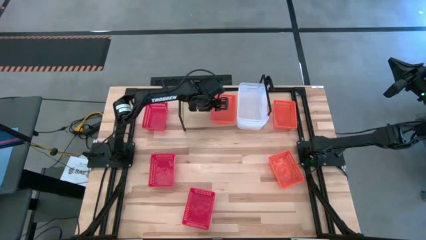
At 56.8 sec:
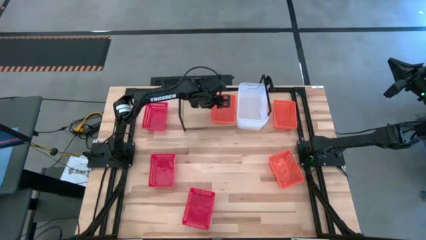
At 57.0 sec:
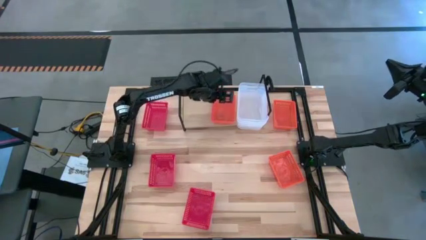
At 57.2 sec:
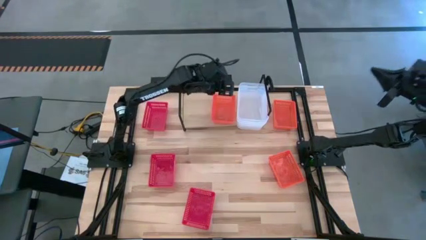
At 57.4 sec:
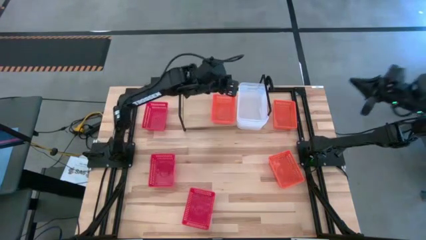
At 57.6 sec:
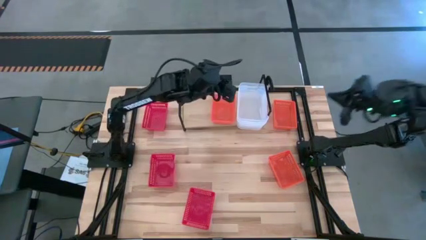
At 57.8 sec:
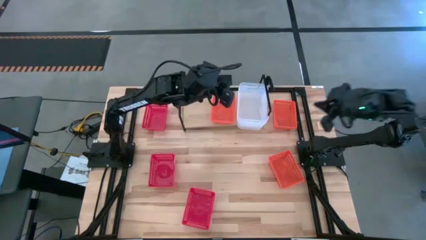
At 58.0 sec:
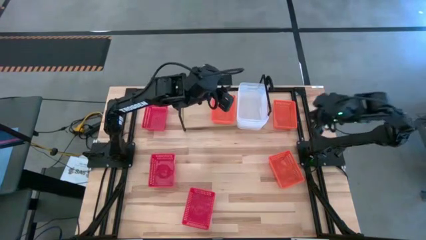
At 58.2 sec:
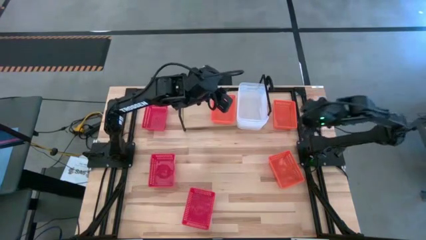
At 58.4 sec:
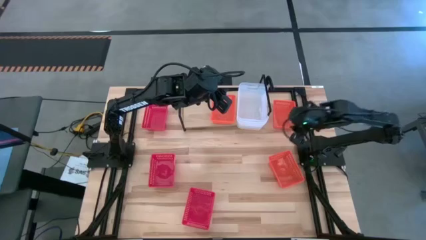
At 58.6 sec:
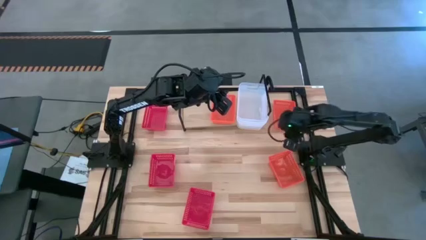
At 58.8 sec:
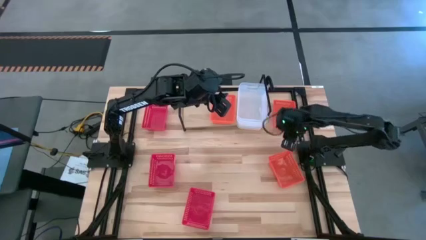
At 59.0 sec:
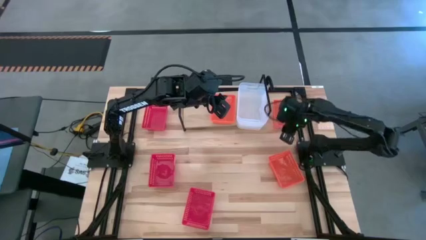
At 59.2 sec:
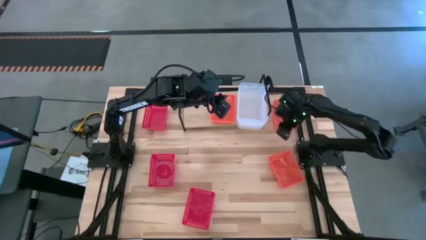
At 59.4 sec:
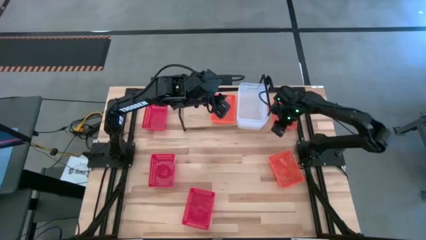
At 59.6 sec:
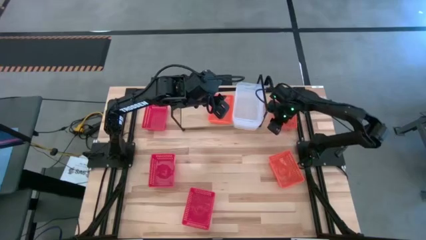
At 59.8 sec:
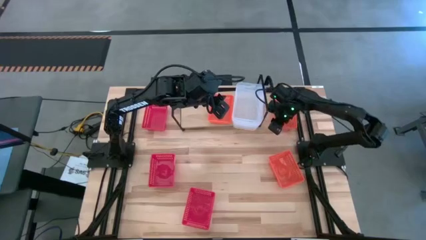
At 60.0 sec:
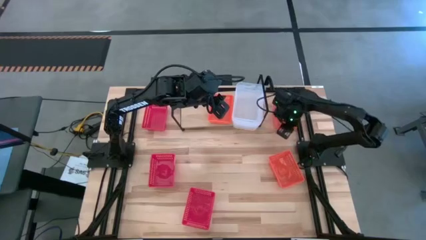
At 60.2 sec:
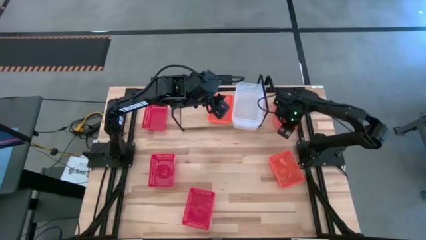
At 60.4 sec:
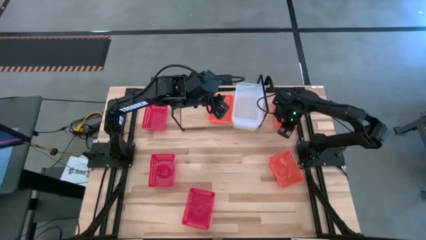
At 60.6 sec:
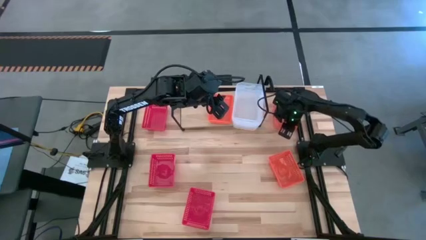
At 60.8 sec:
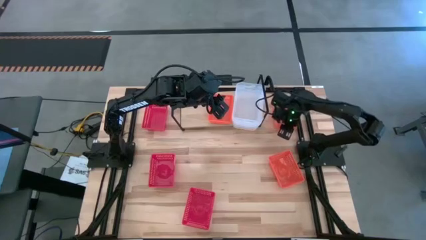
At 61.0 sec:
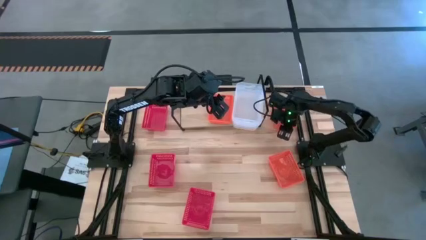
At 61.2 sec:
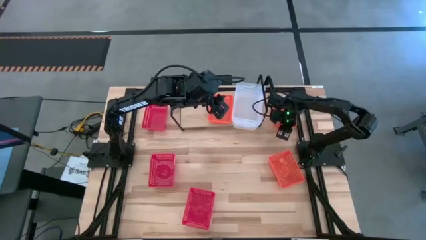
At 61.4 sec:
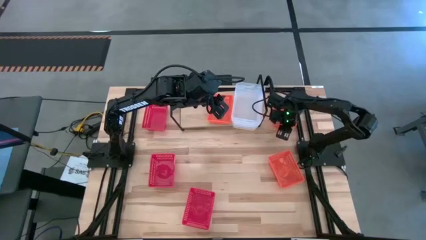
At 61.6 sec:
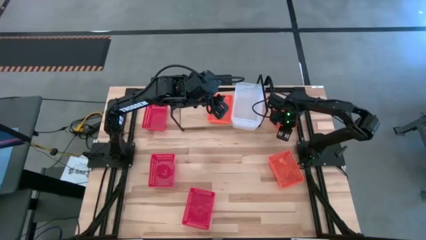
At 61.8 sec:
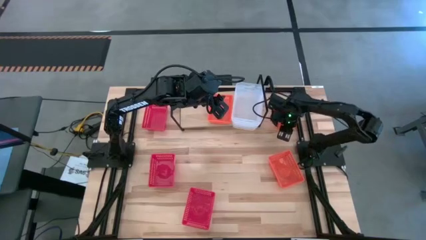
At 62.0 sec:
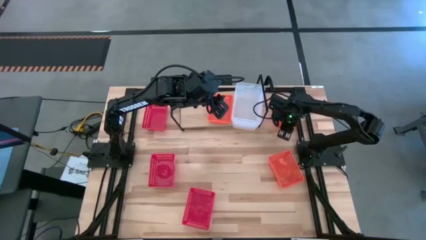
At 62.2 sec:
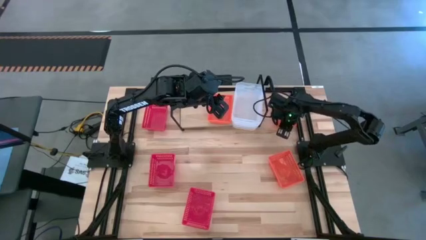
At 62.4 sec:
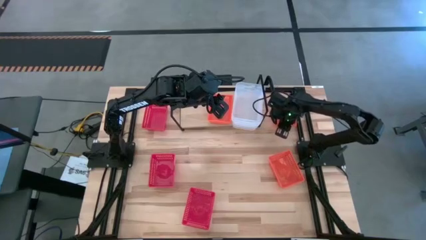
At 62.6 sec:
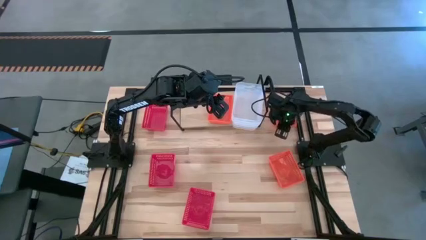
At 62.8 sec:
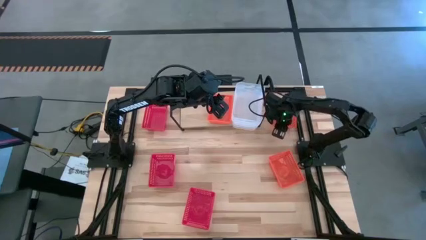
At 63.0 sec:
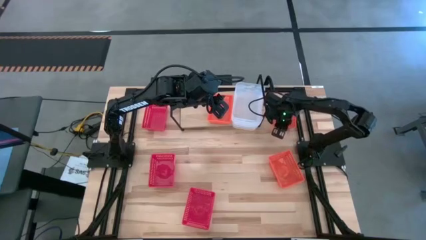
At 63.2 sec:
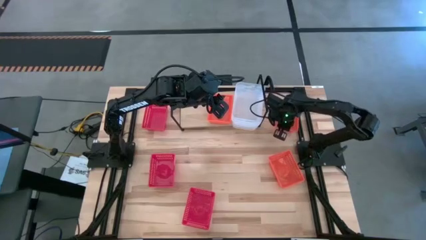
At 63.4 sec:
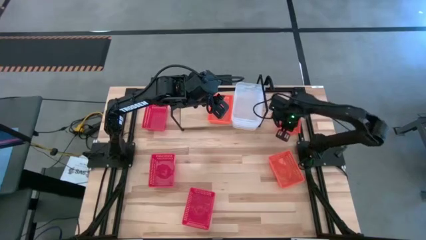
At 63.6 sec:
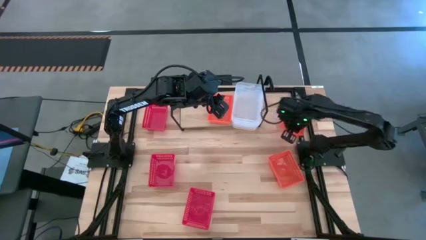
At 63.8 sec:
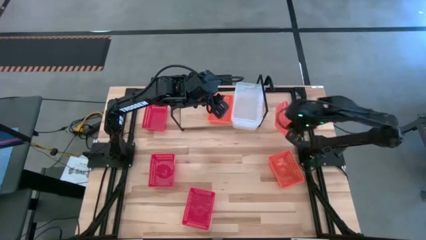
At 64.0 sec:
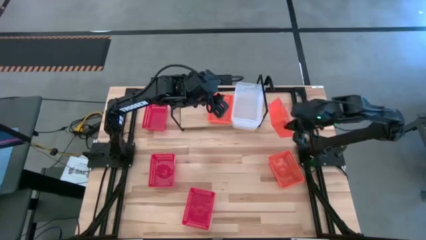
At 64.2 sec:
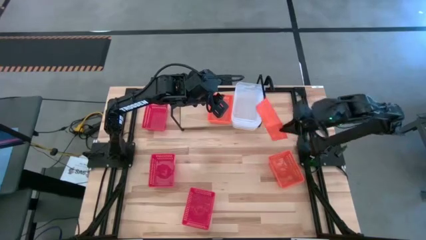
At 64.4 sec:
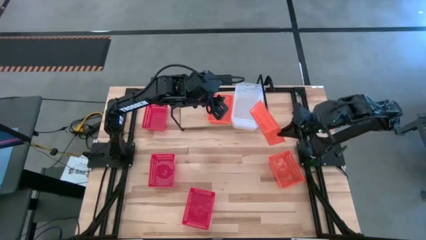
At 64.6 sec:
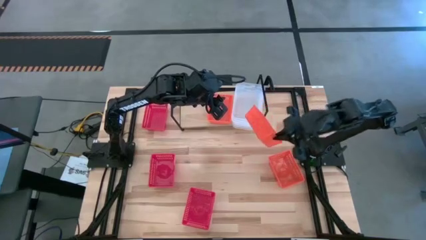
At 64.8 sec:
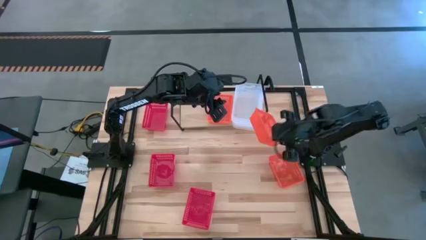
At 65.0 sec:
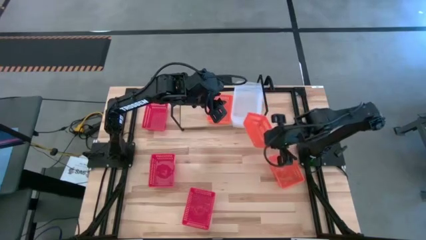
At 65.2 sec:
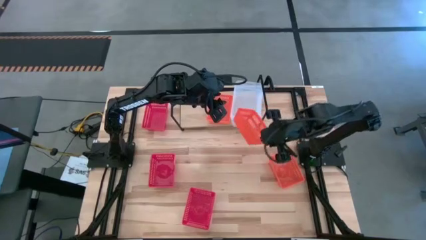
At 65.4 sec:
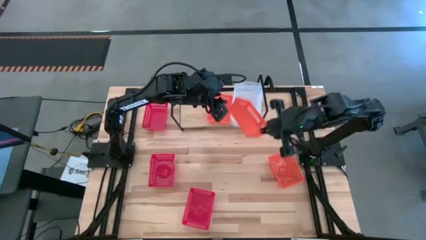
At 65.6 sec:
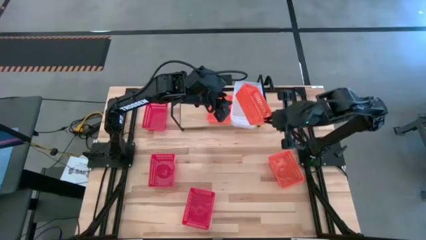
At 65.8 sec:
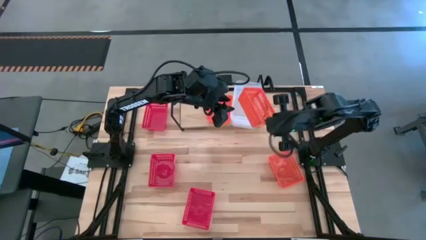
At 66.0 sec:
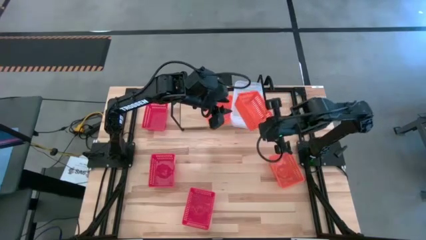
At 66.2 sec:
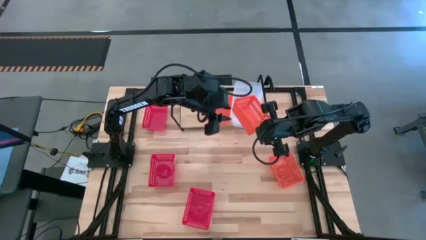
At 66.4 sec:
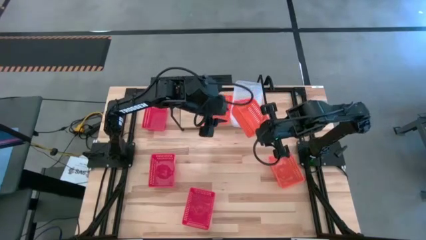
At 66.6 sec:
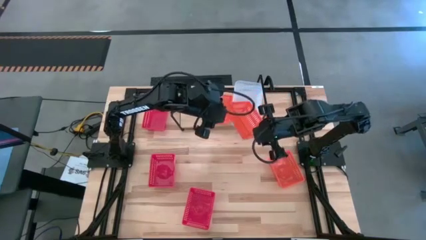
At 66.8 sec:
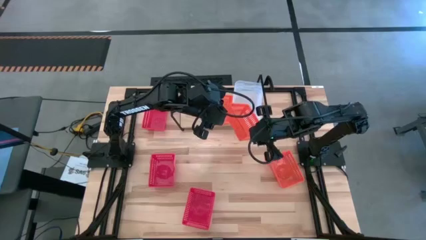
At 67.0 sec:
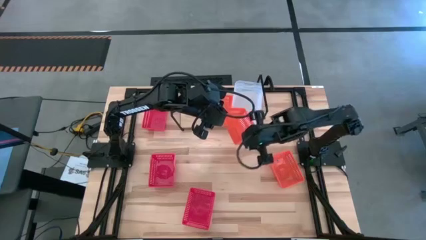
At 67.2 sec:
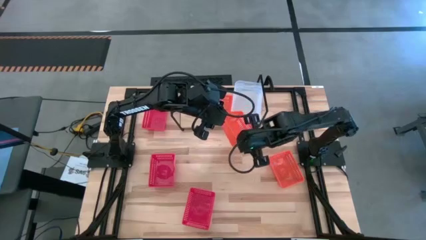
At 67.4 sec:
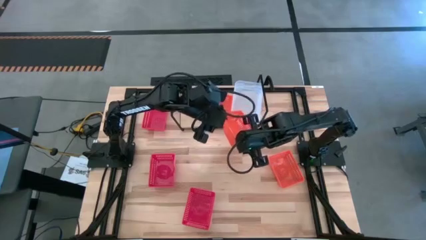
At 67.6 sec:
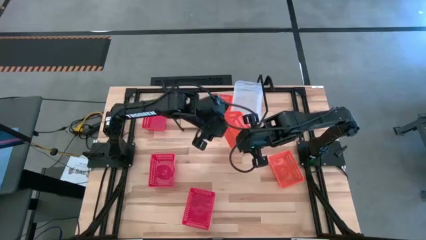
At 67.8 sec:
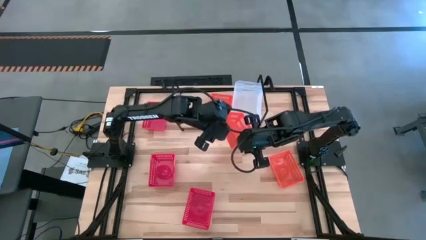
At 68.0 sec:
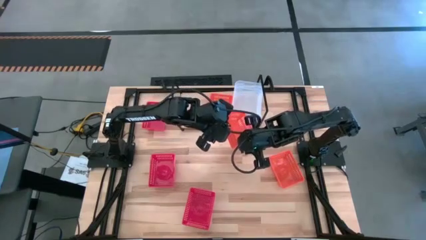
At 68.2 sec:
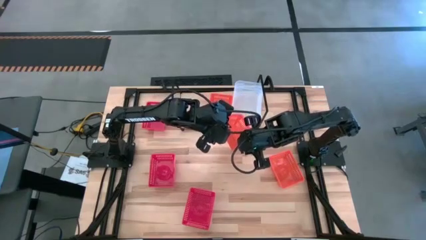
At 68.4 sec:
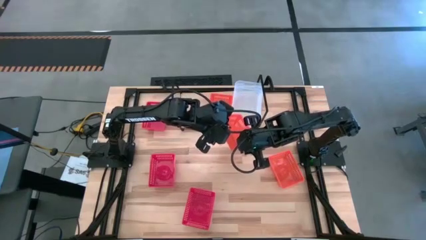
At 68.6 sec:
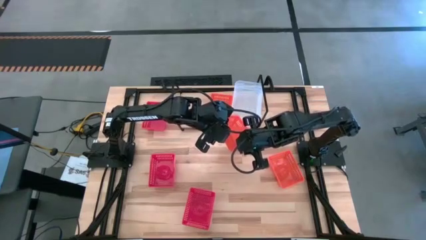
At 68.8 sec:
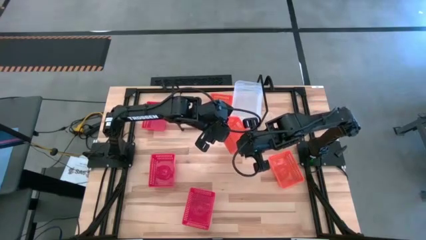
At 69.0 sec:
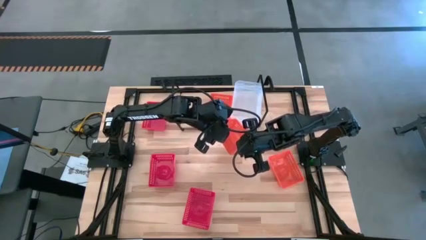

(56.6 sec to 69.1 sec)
Task: Stack baskets on shelf by color
Stack the top orange bin on top of the orange bin on the shelf

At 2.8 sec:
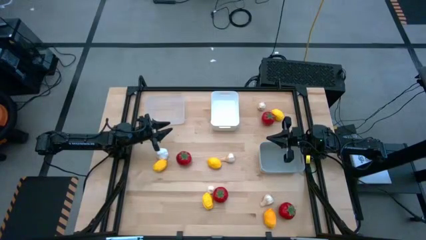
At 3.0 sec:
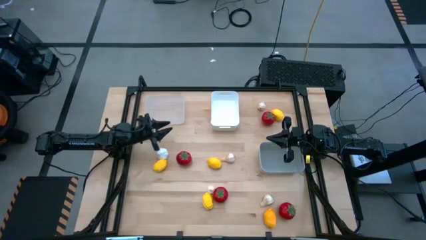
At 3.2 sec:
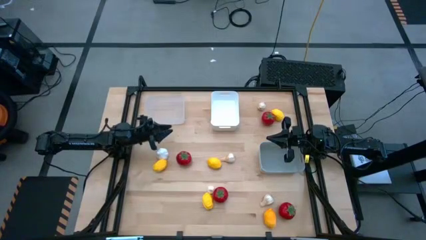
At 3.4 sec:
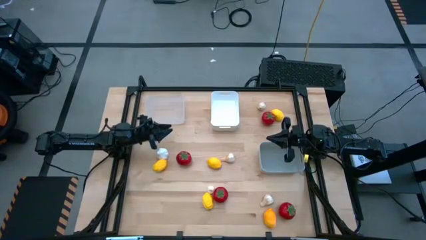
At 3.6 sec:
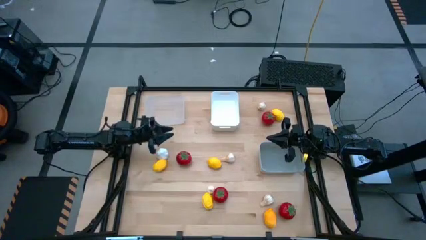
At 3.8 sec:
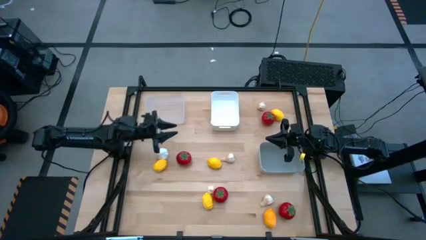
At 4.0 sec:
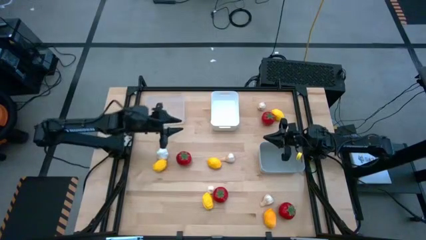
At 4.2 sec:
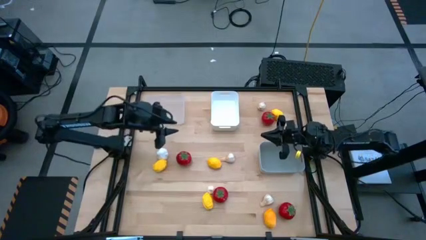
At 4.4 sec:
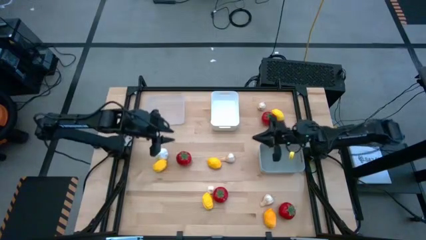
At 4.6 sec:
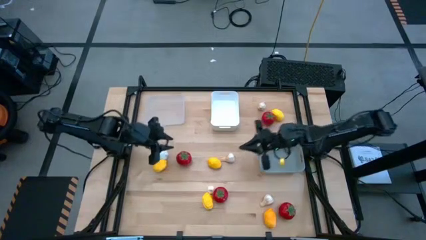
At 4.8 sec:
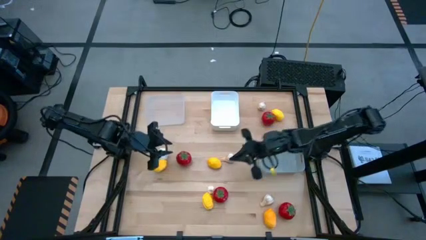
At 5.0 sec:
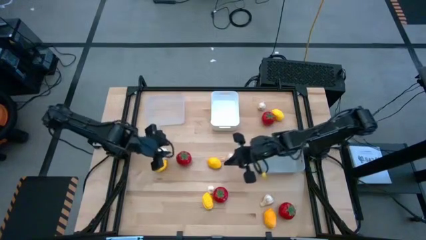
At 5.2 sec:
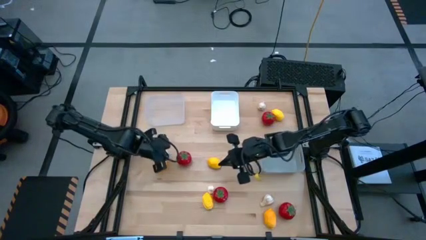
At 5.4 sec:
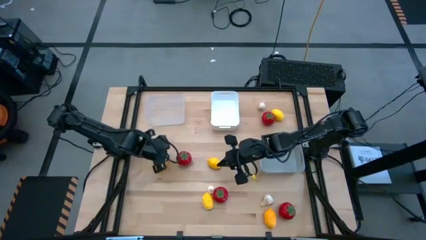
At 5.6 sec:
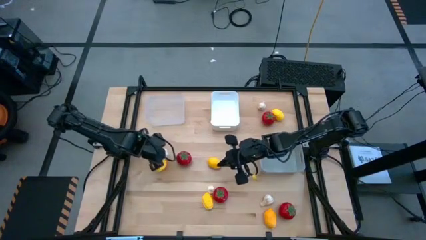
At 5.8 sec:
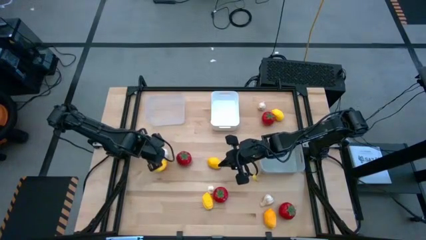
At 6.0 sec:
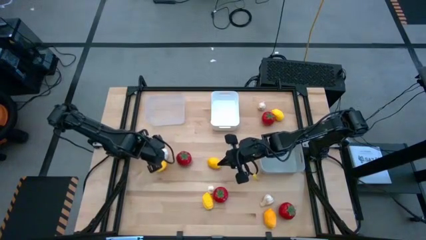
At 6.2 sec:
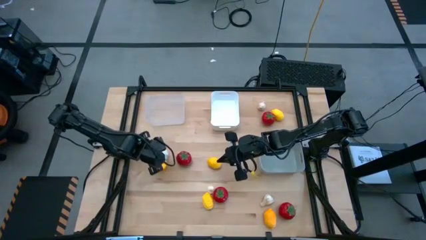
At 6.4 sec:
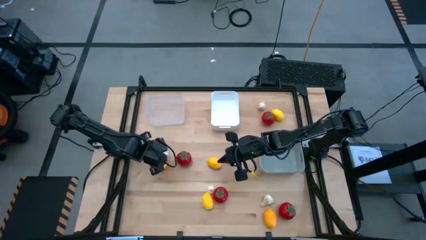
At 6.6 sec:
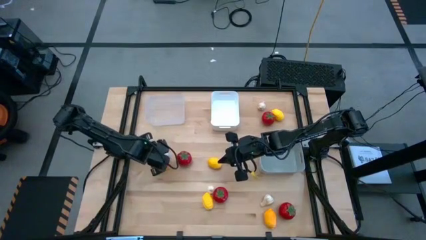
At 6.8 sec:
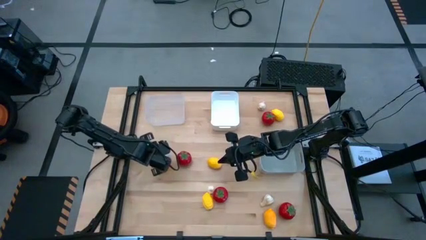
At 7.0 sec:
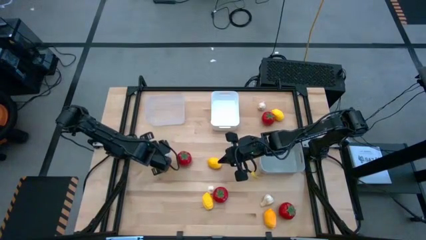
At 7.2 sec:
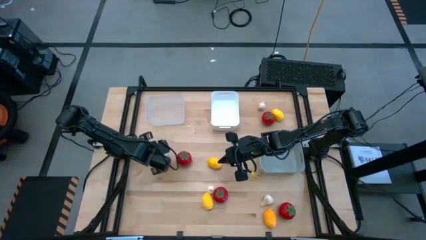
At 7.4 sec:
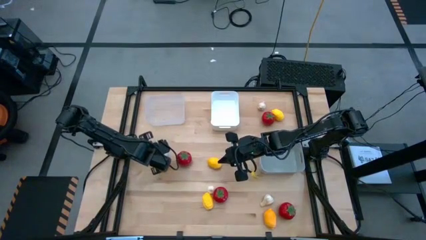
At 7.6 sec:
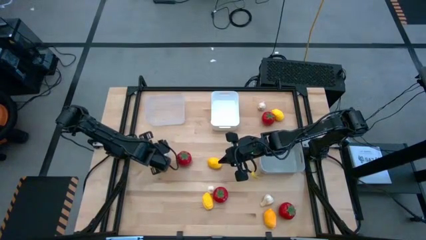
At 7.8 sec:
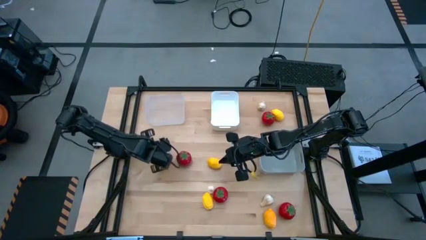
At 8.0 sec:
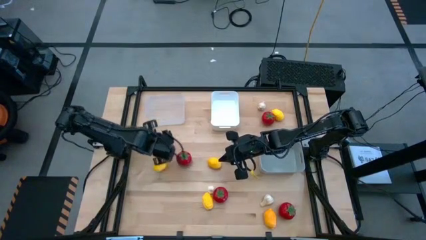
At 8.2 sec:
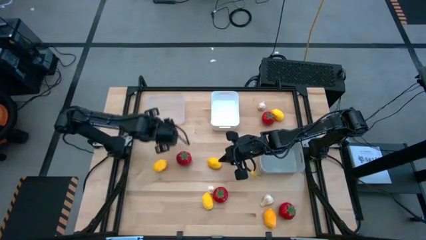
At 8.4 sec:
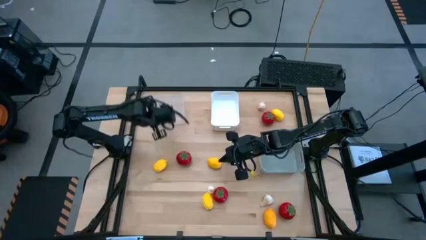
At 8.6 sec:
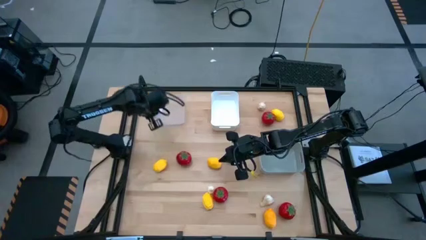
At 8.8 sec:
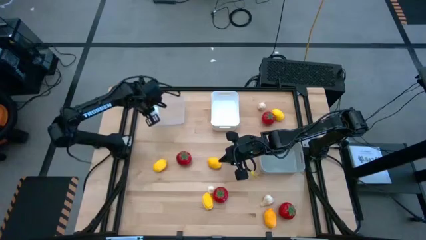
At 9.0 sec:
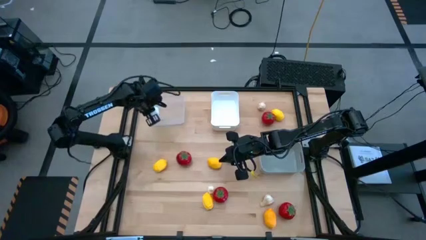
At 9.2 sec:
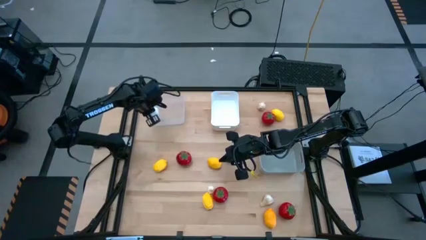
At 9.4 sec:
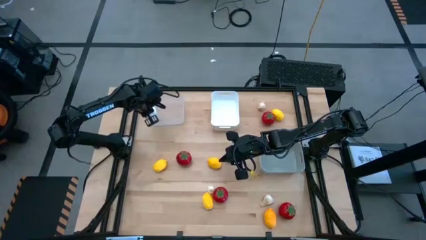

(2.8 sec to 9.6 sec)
Task: Sort produce into baskets
Put the garlic into the transparent bin
